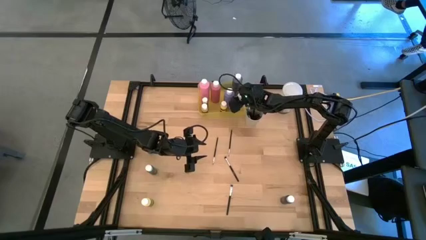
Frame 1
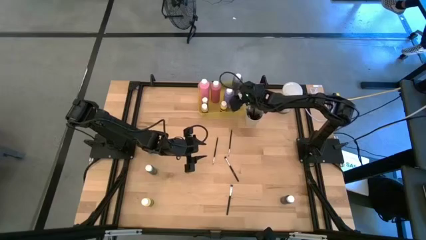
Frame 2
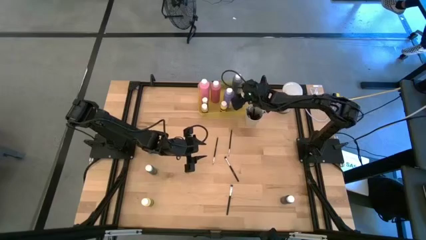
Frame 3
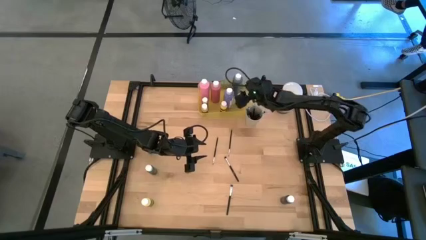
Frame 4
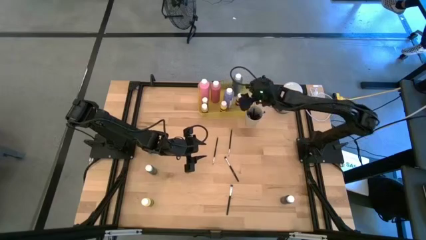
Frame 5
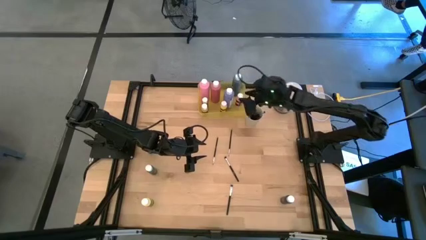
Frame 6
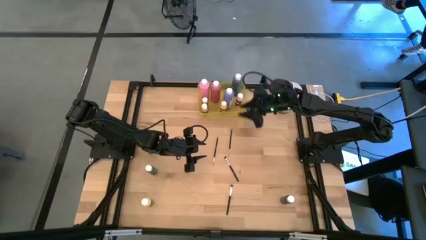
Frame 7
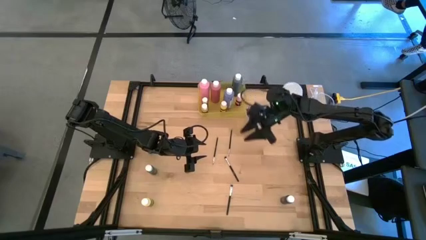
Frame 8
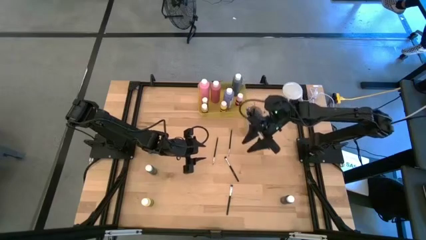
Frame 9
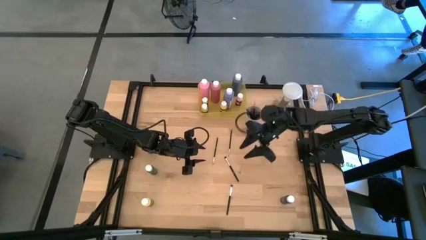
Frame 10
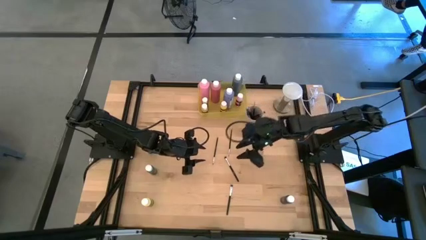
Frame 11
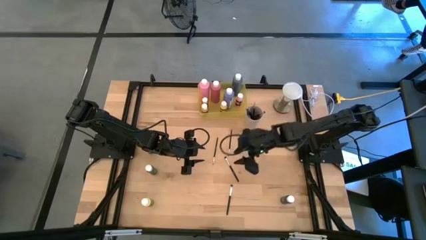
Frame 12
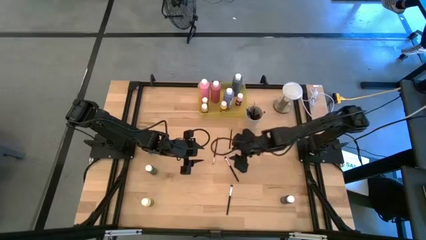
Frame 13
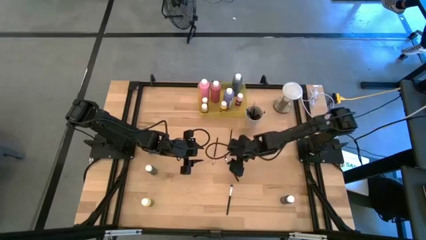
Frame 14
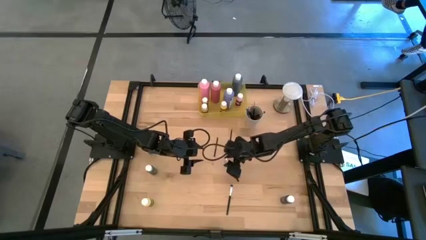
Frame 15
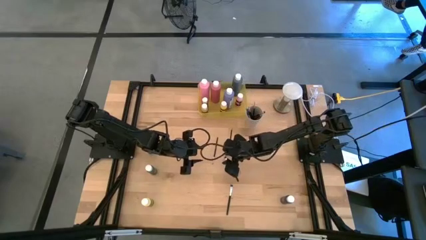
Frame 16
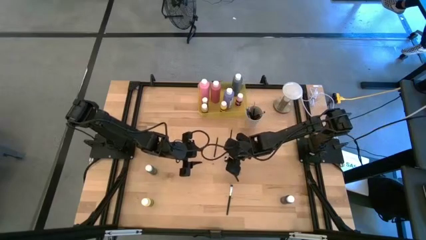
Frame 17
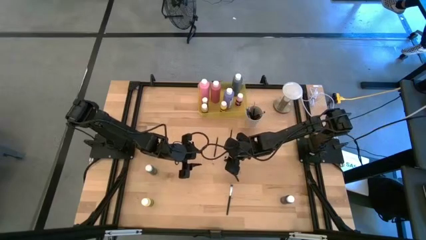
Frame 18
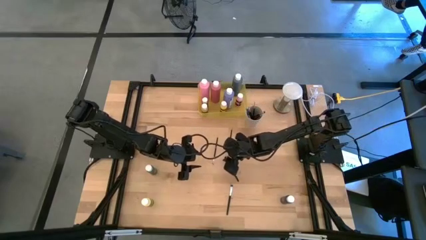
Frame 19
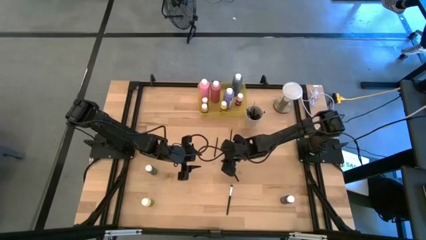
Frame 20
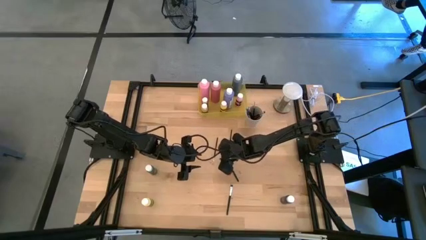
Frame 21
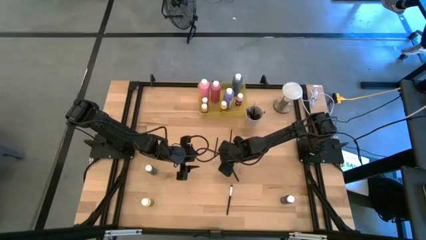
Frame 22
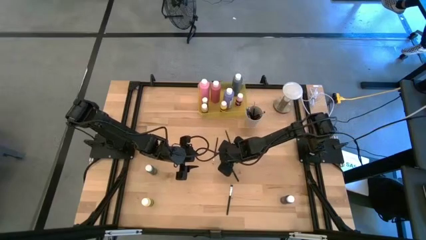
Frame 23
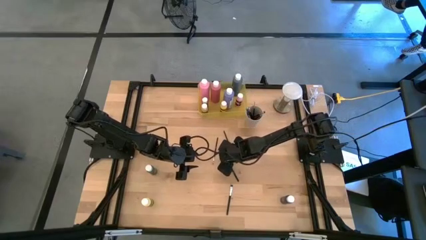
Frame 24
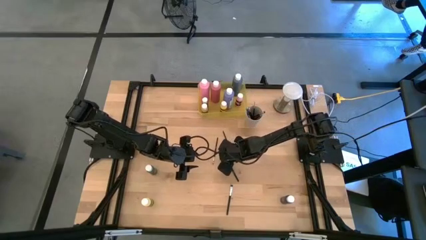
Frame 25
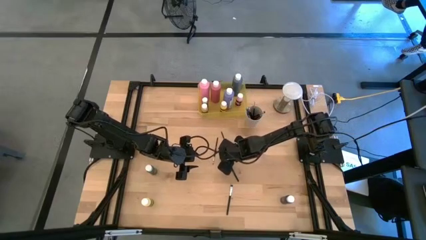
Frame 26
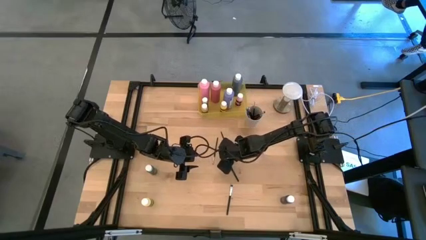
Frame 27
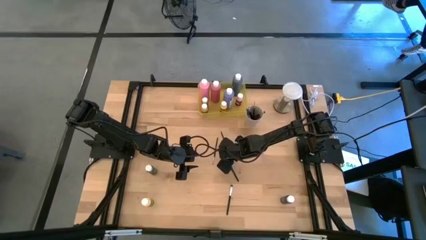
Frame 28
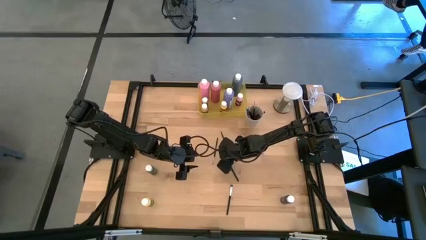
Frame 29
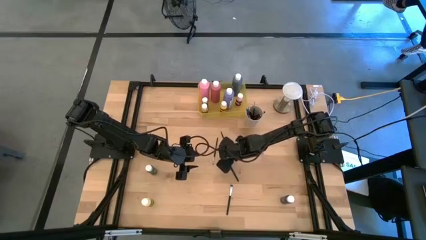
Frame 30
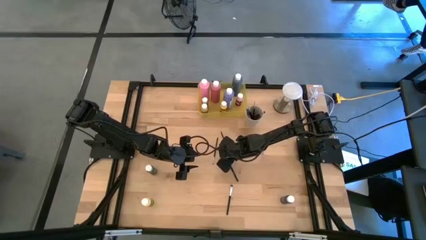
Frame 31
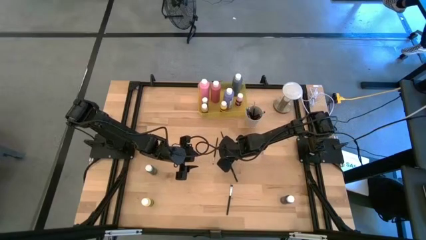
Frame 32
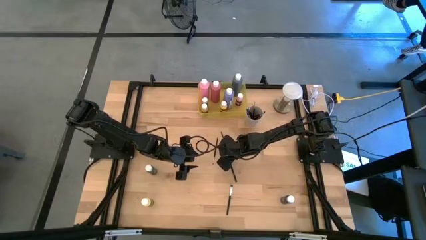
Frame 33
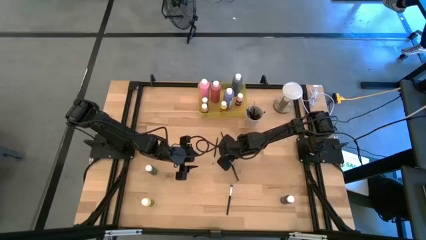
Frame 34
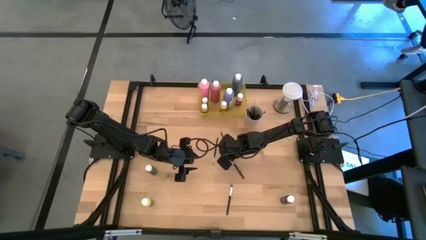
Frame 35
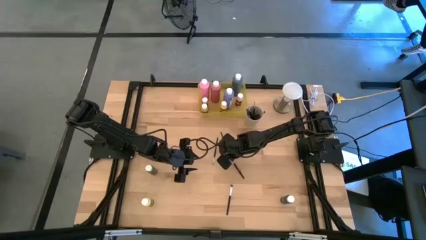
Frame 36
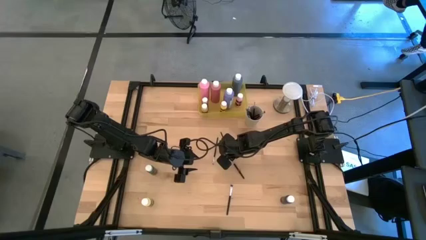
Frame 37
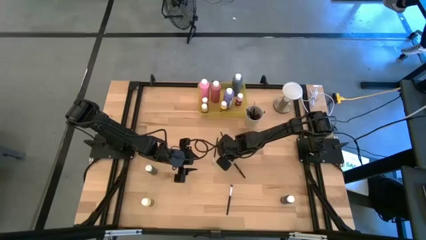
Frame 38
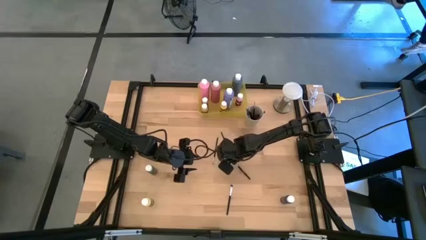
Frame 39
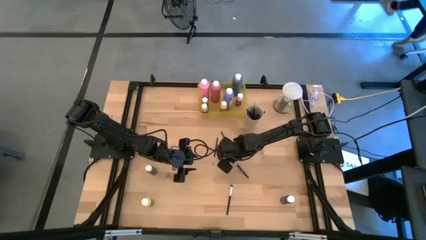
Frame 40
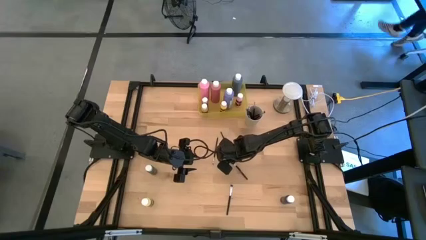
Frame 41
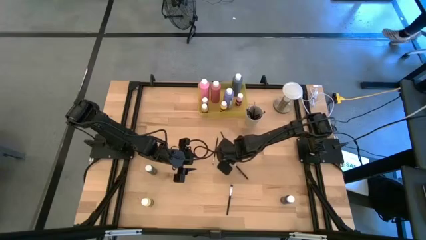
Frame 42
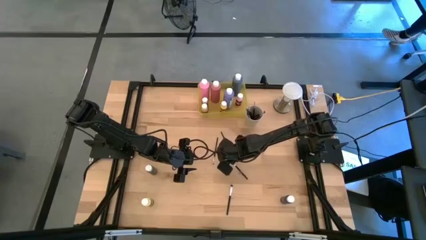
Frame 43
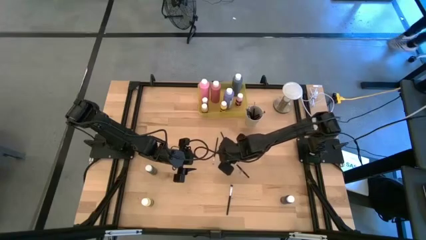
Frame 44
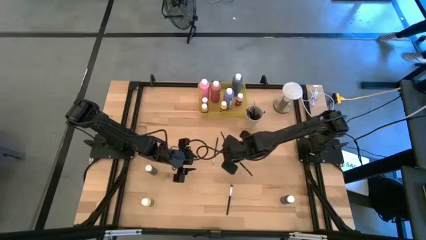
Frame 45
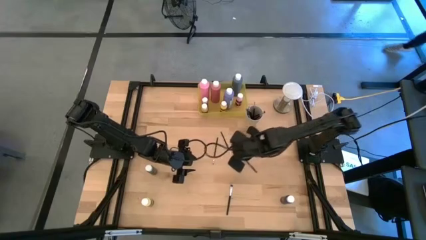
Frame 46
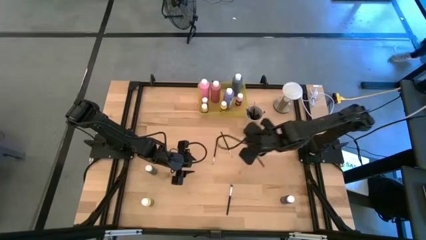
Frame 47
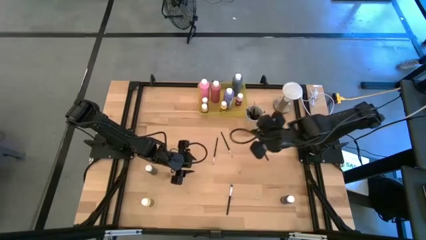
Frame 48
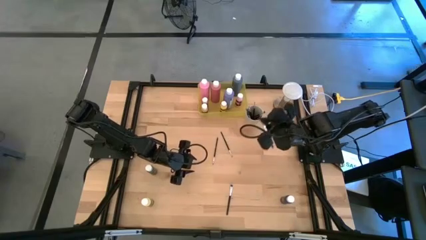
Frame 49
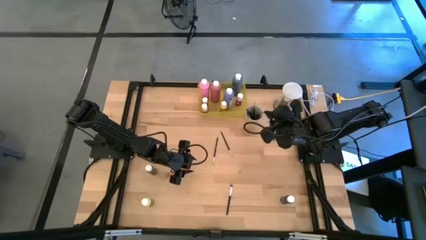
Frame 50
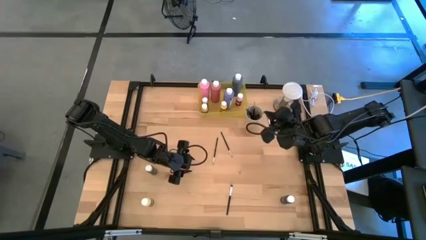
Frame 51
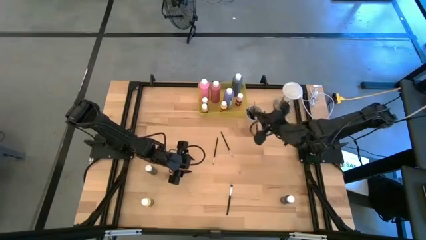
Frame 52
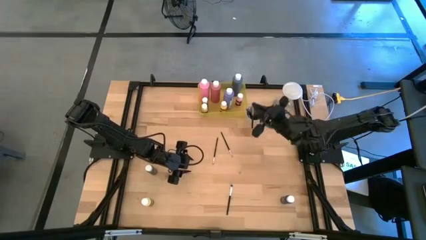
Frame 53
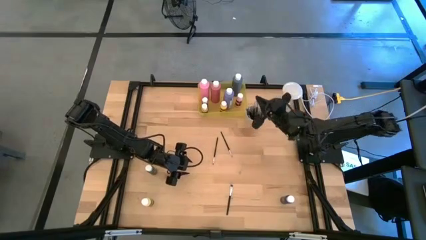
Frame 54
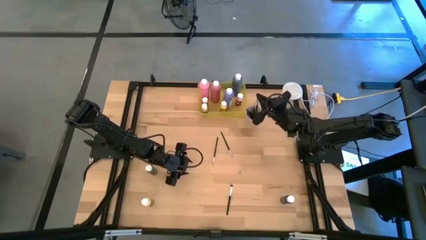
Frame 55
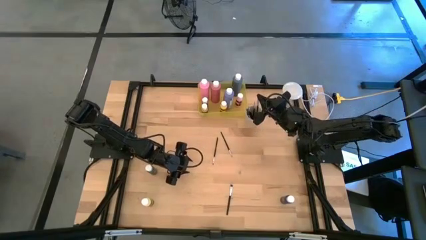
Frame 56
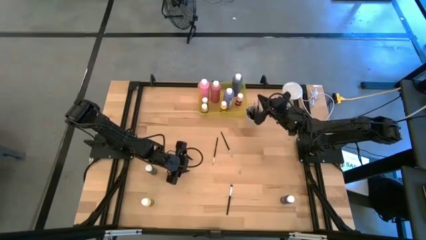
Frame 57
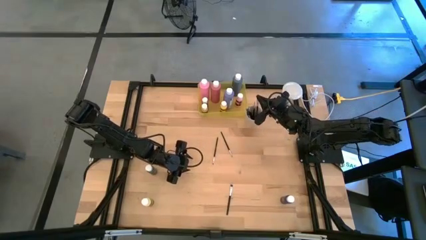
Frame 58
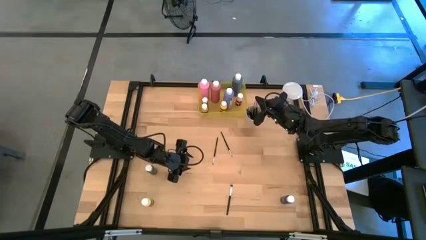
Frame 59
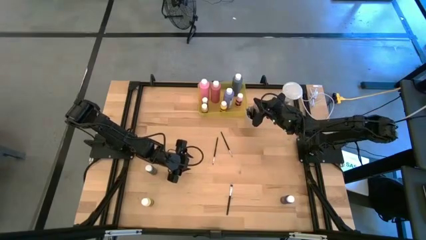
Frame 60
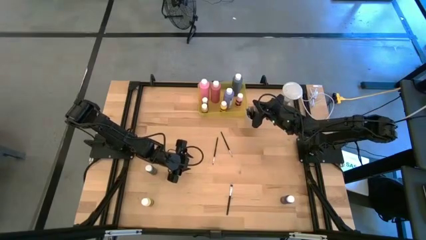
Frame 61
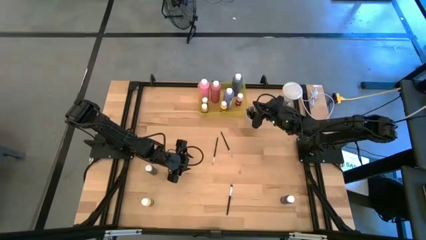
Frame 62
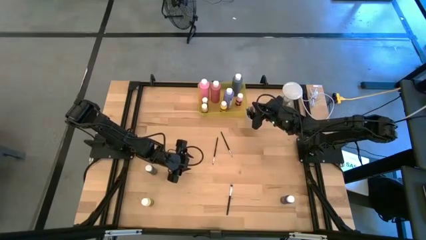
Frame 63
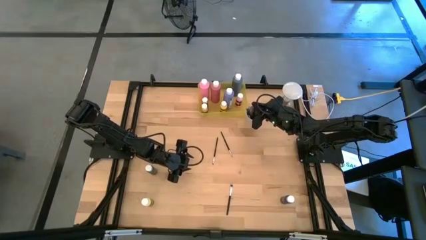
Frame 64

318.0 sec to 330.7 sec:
Task: Pick & Place Paint Supplies
Put the silver paint brush into the white cup

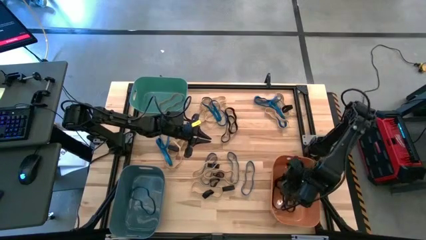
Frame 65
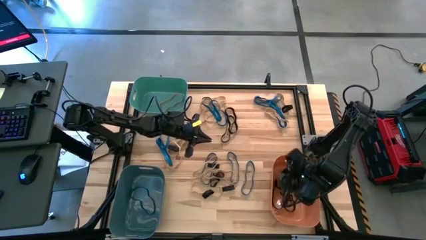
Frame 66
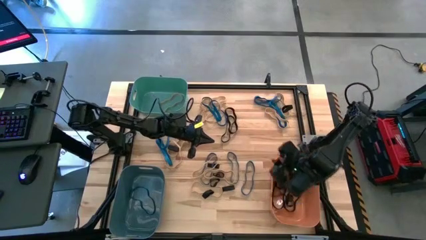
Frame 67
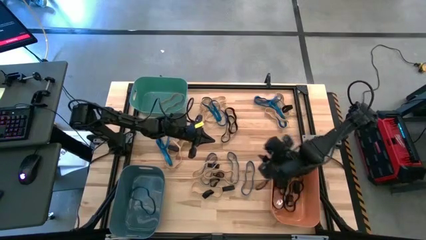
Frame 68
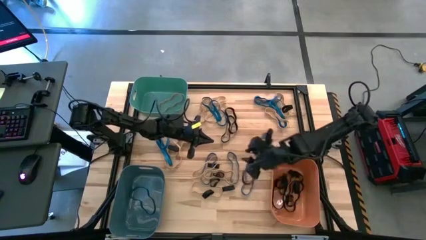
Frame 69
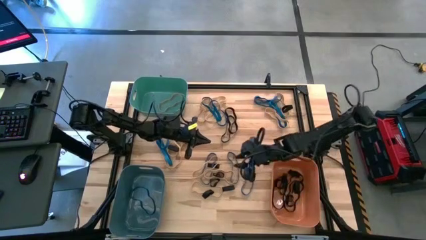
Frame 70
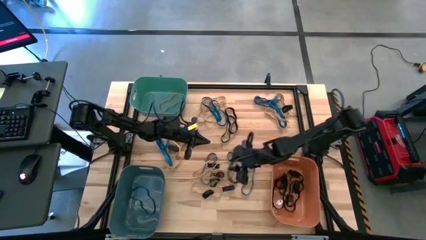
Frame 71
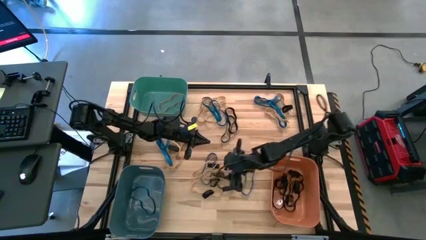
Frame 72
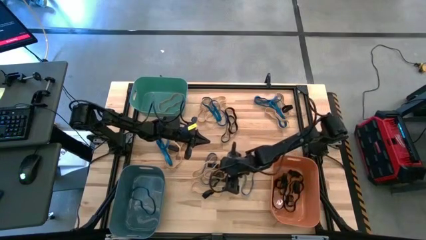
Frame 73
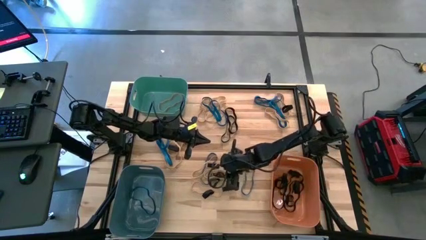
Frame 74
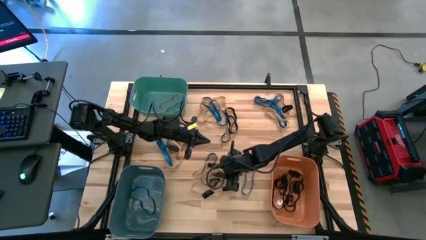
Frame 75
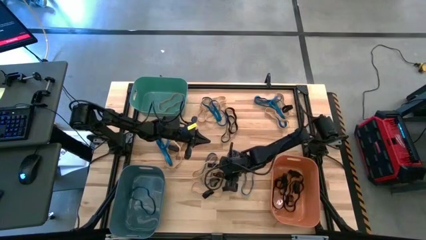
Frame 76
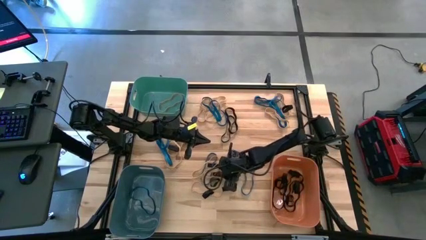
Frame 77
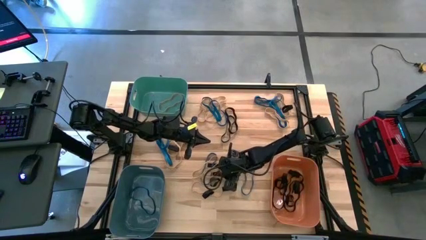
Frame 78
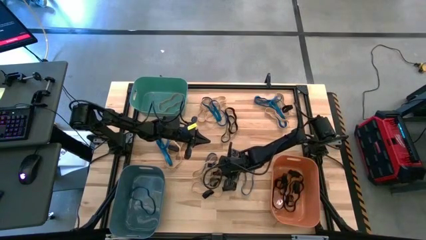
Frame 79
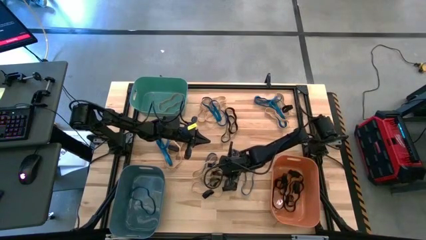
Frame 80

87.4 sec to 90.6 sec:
Task: Sort rubber bands into baskets
Put the black rubber band into the orange bin

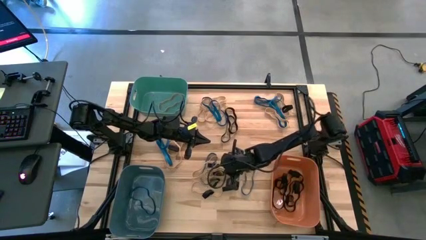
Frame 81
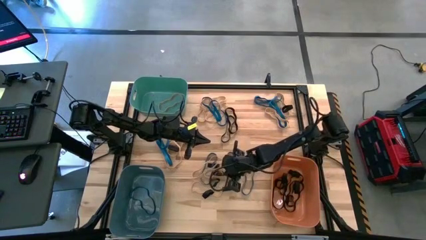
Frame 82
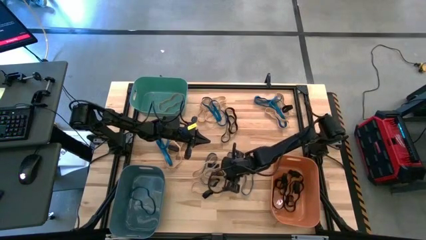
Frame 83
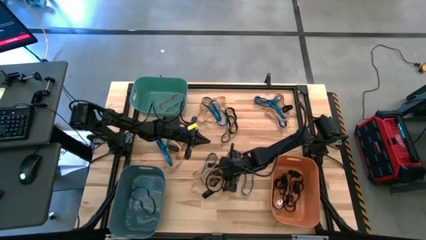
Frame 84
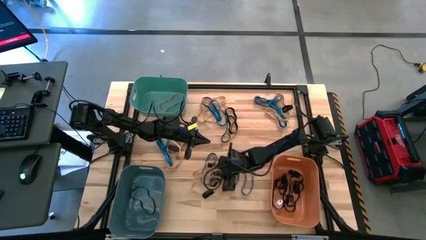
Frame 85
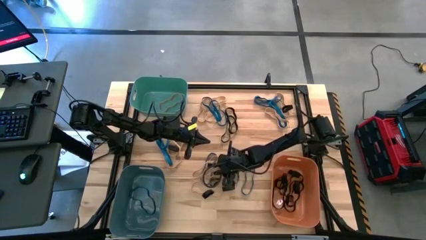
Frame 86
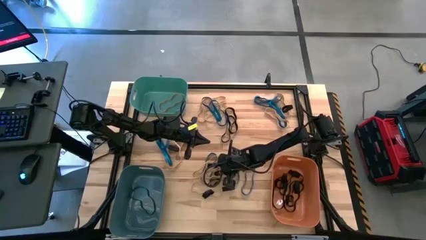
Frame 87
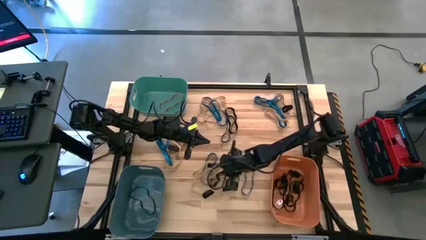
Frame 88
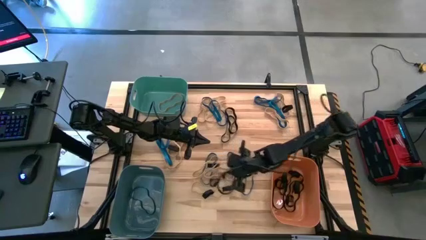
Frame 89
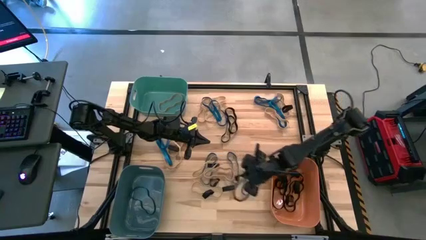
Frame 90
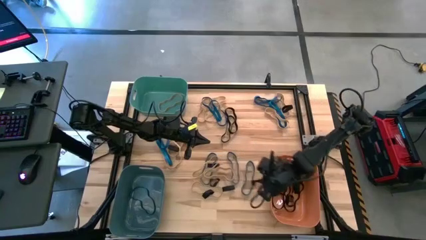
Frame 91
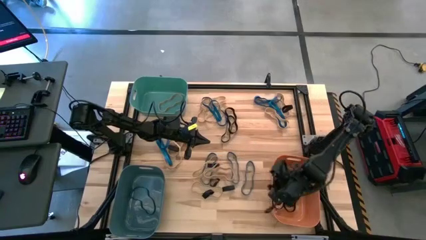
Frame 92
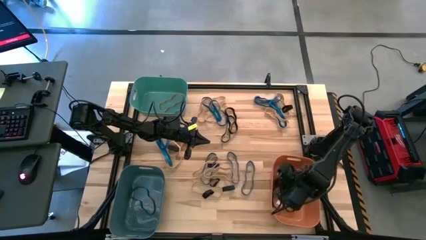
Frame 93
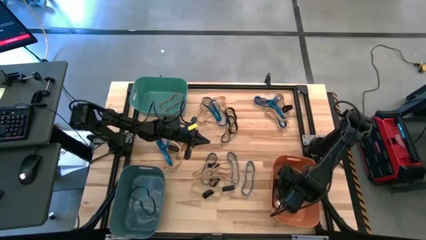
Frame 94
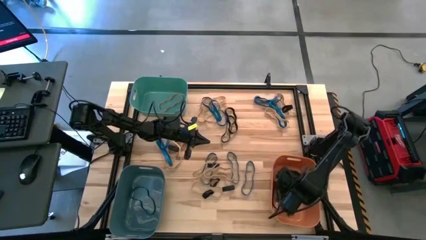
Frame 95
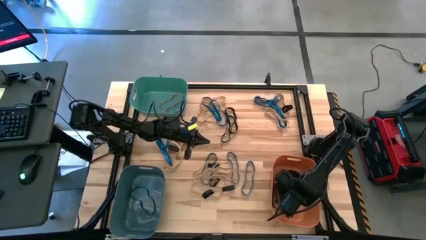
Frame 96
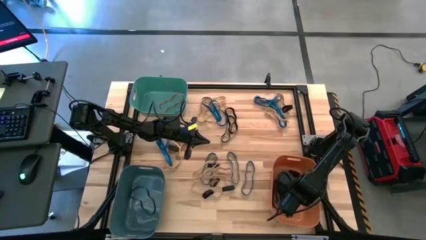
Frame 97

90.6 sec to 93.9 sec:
Put the black rubber band into the orange bin
